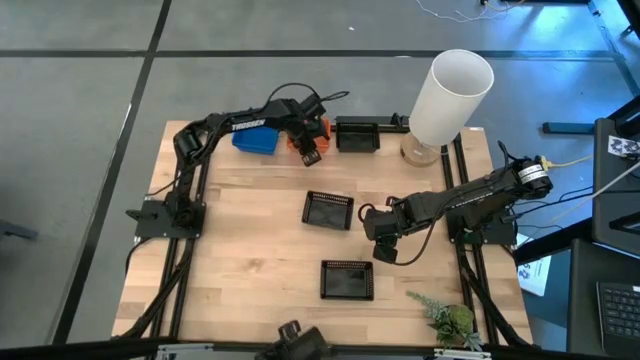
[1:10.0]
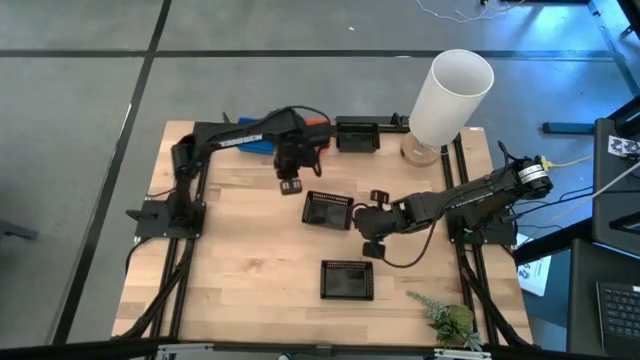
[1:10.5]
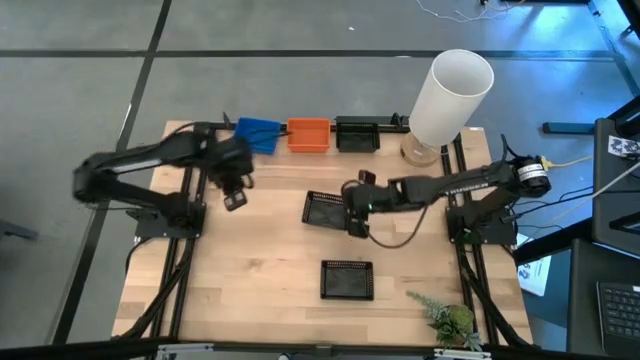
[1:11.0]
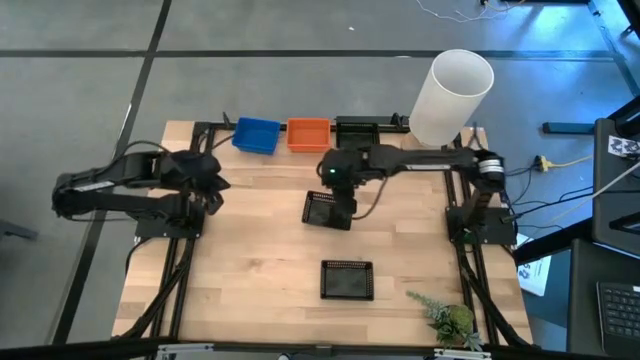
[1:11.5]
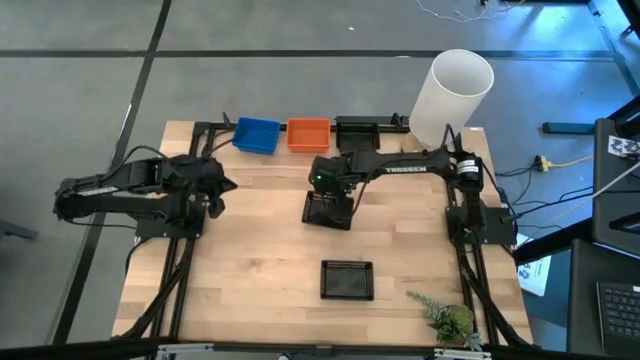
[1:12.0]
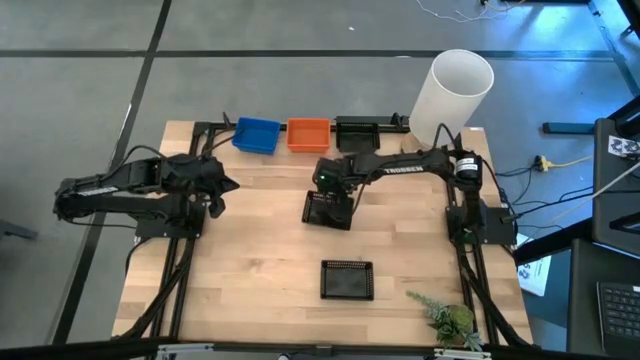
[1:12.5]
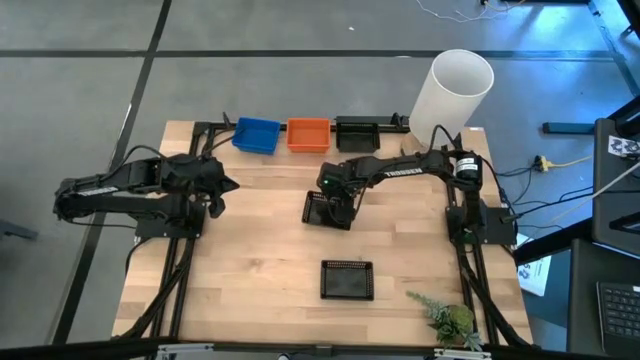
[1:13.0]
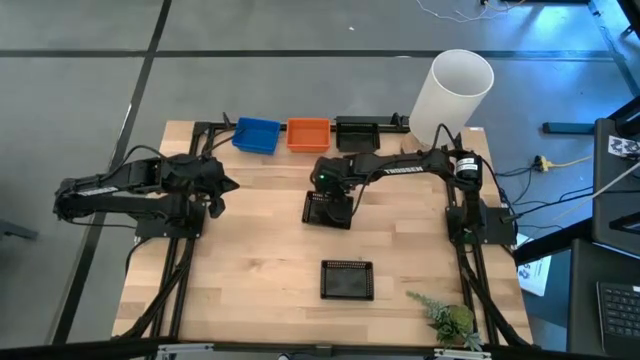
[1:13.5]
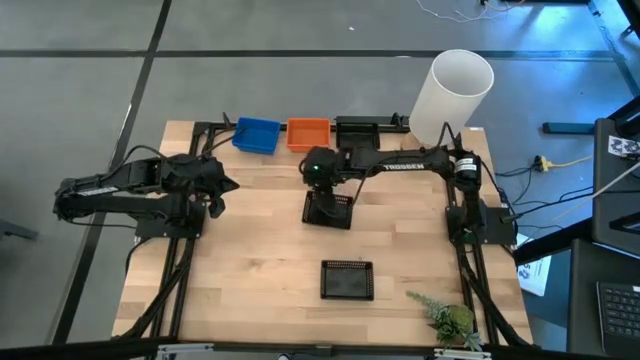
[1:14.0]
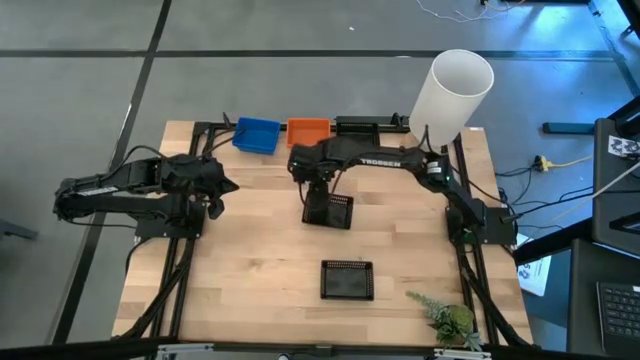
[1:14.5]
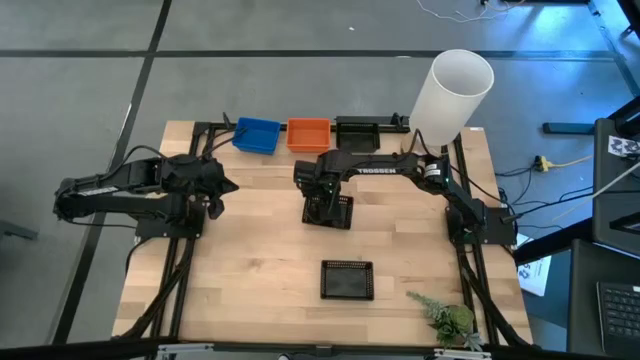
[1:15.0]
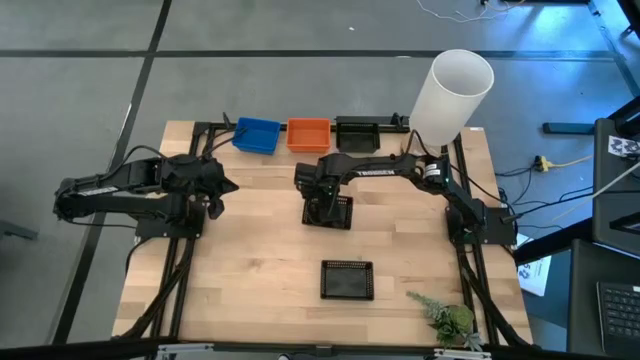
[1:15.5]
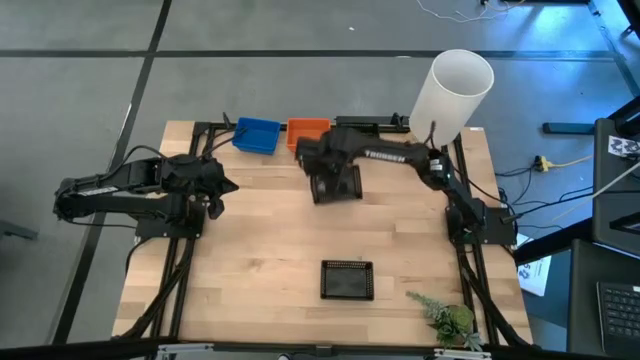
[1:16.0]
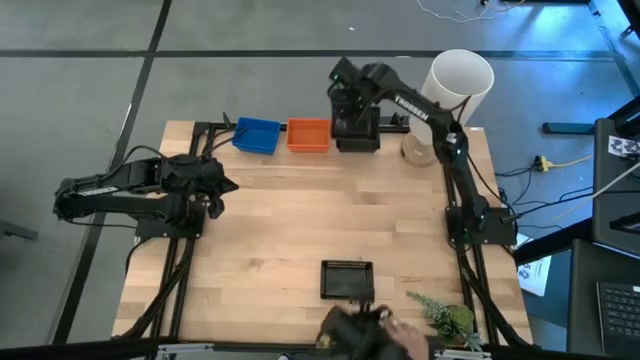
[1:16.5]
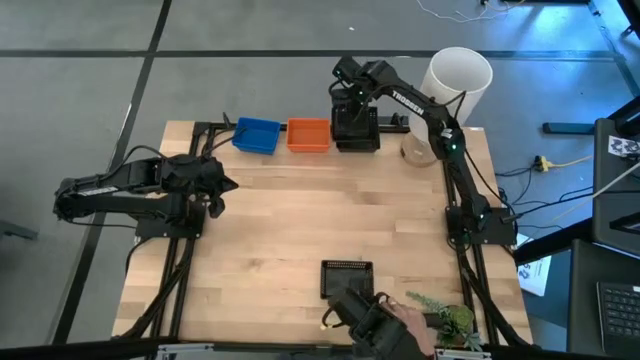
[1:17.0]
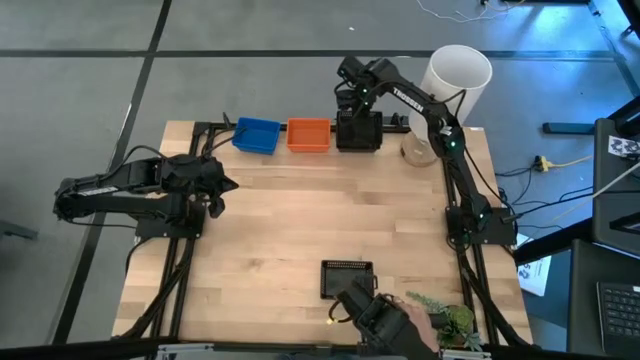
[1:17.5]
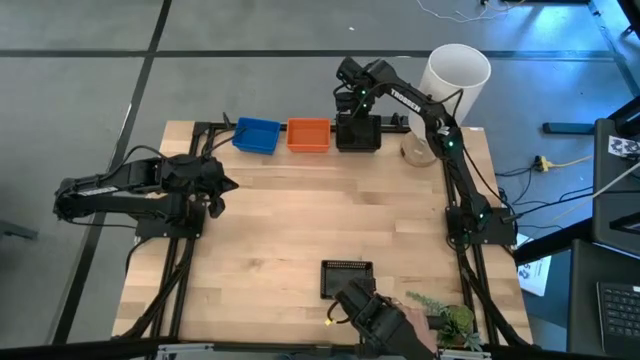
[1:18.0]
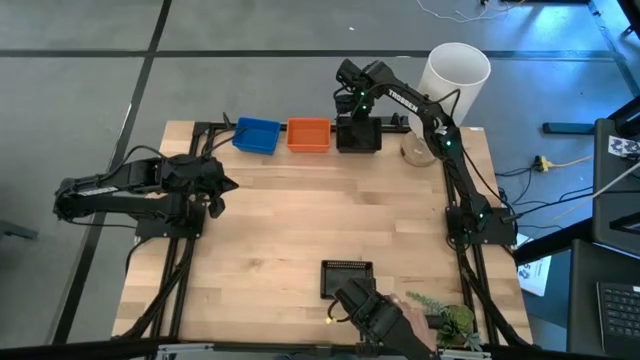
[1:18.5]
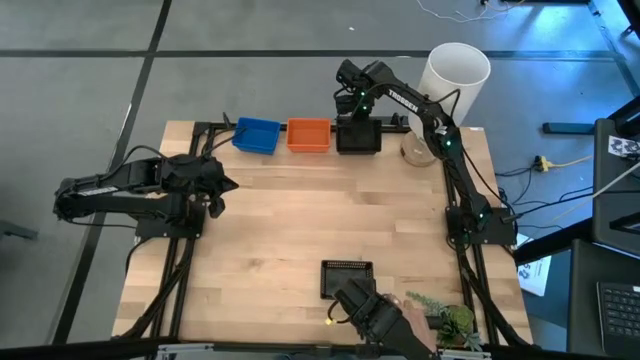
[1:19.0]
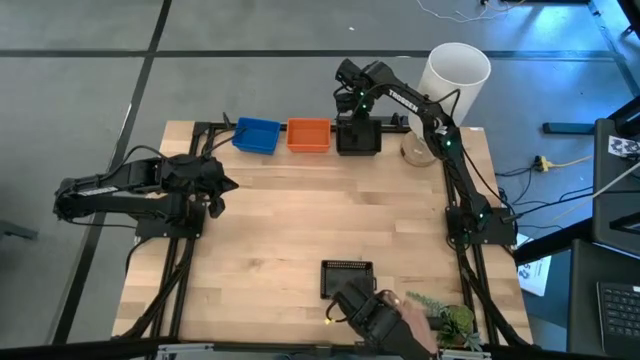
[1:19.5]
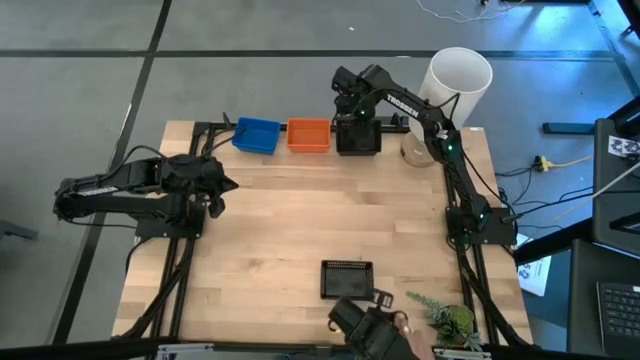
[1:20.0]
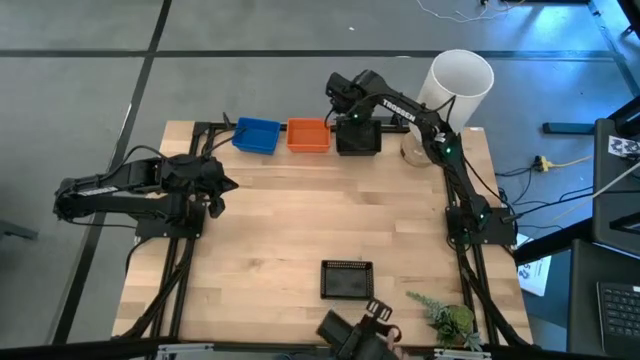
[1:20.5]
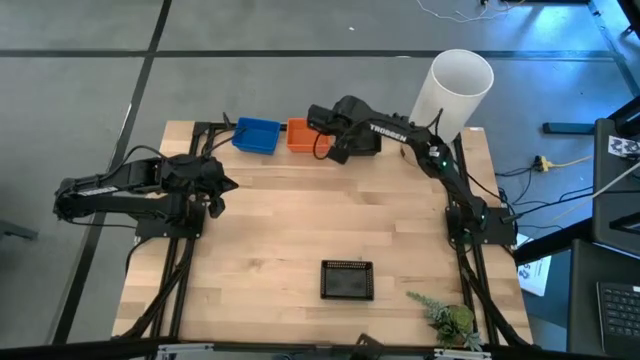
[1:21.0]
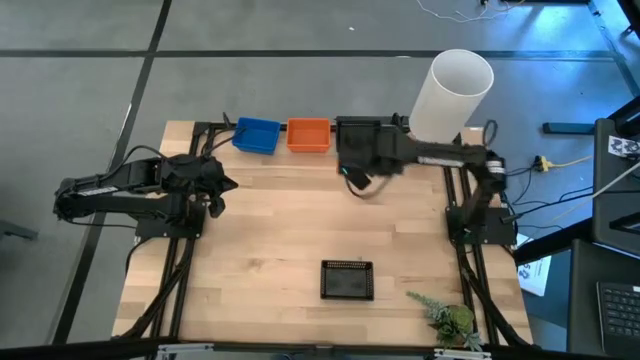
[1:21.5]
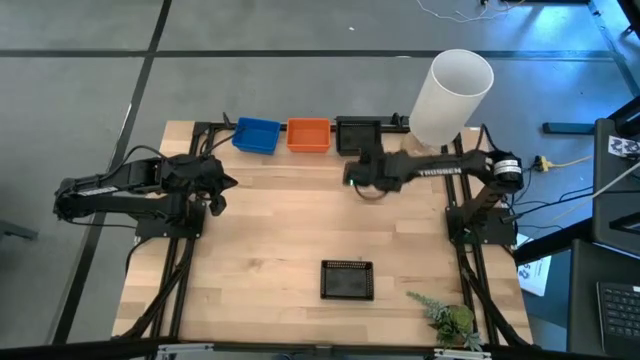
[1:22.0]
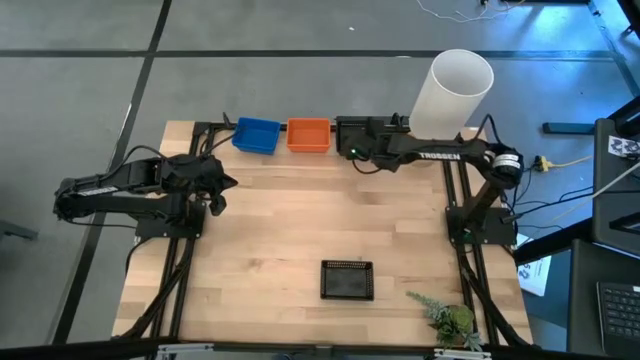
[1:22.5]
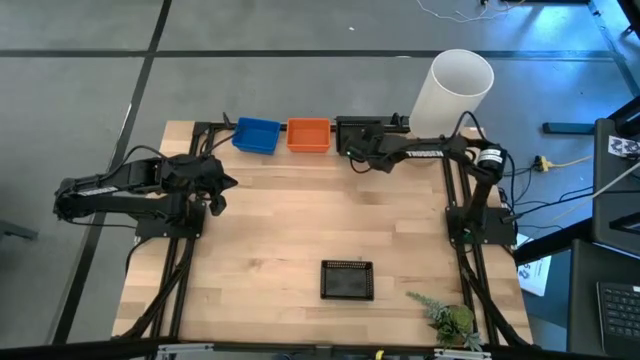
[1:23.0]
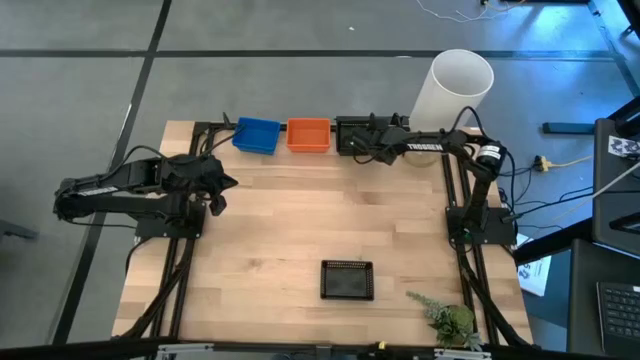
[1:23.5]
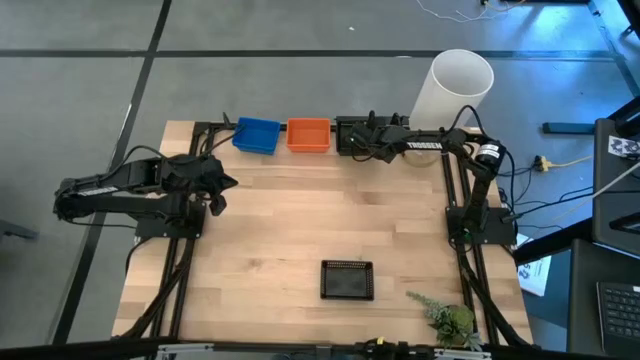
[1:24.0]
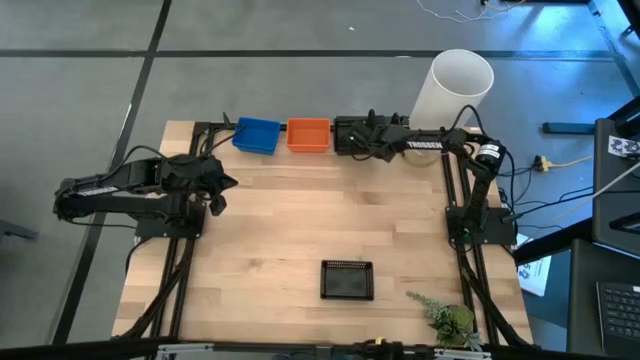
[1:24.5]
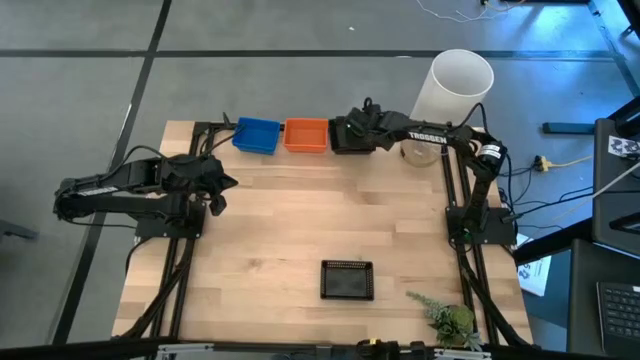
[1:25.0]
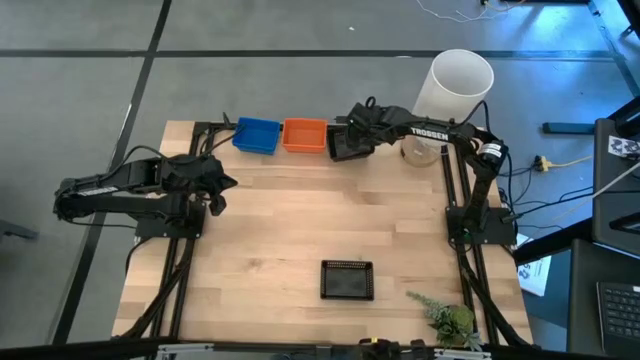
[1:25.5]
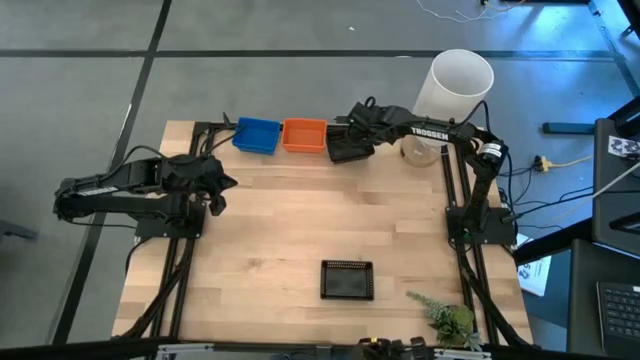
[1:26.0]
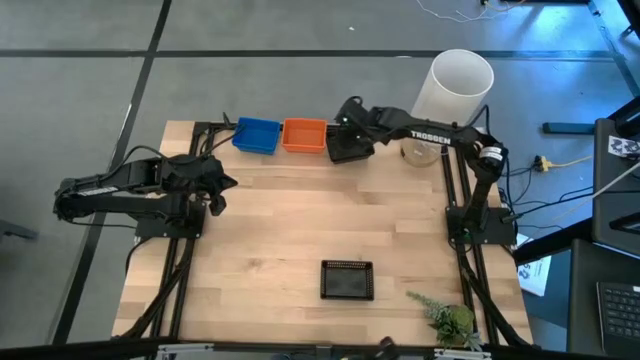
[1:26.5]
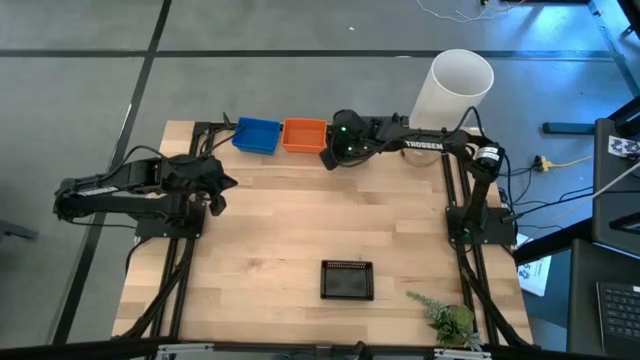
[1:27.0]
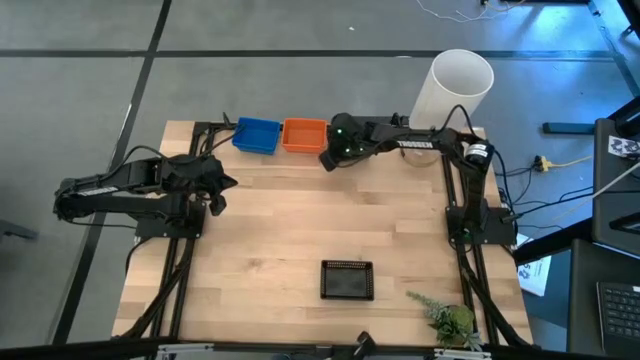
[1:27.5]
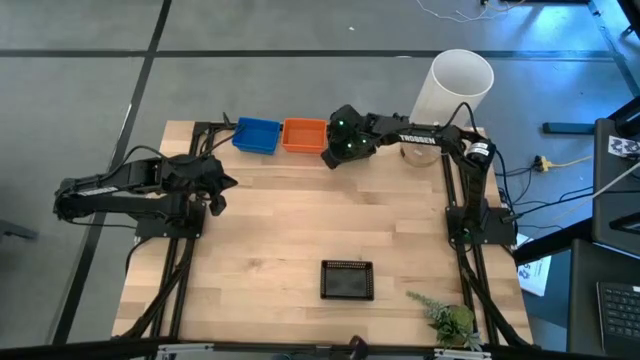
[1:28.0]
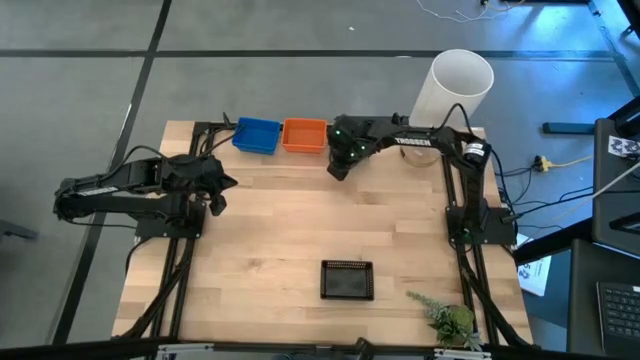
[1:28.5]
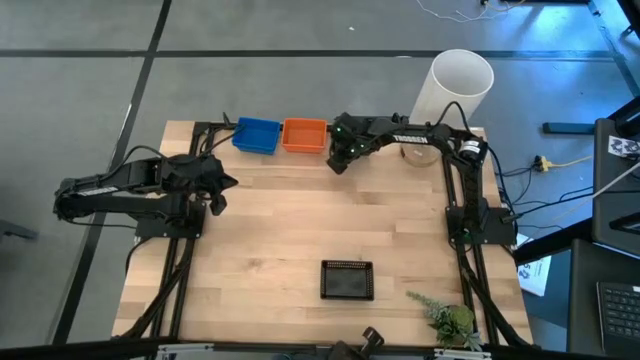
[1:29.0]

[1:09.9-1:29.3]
Stack the middle black bin on the top black bin
